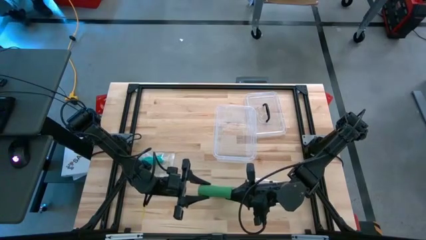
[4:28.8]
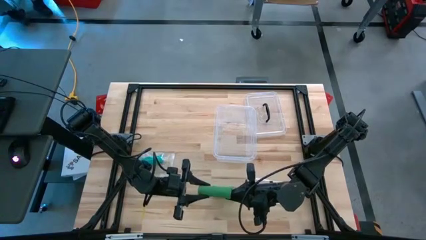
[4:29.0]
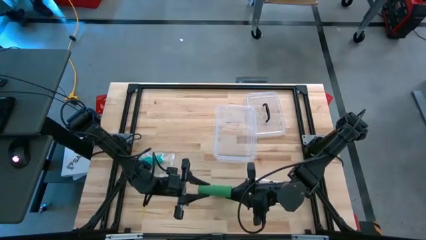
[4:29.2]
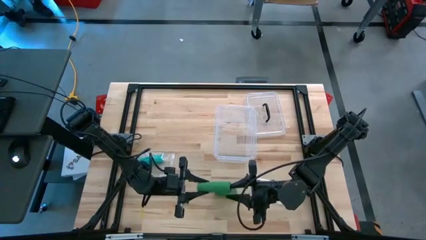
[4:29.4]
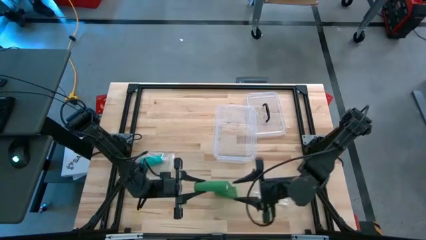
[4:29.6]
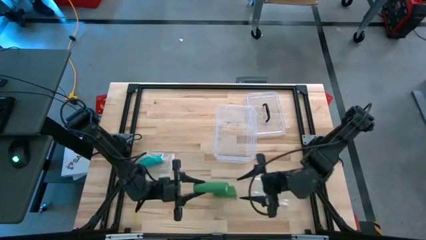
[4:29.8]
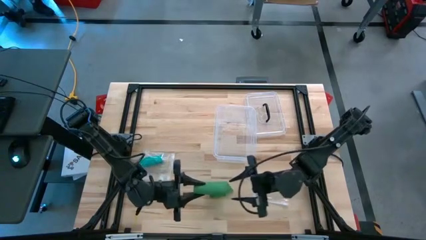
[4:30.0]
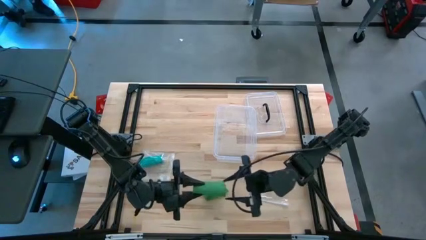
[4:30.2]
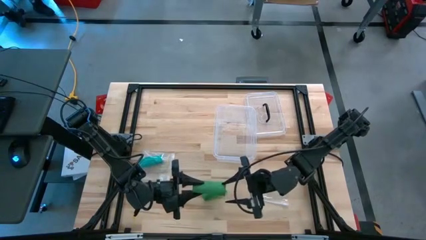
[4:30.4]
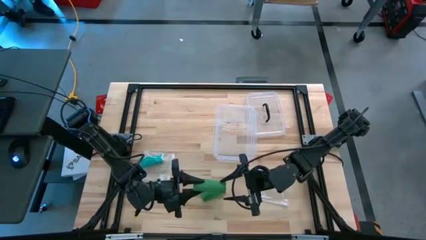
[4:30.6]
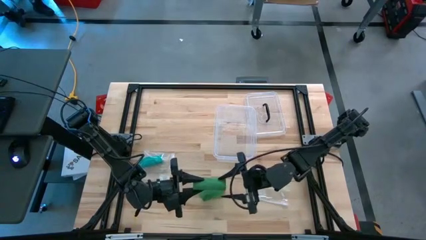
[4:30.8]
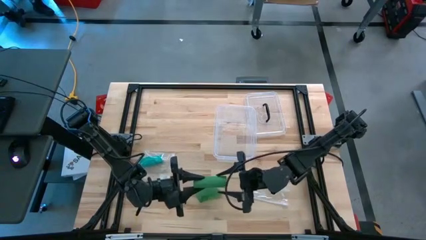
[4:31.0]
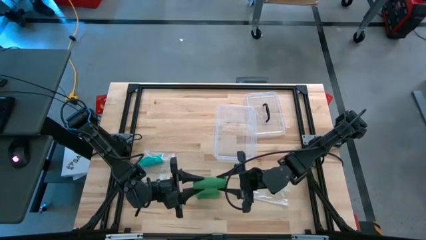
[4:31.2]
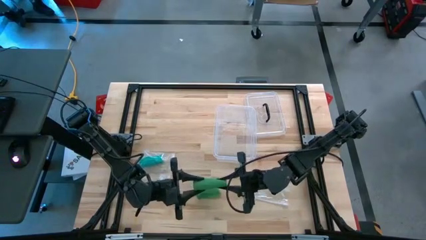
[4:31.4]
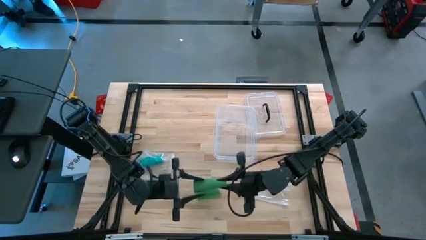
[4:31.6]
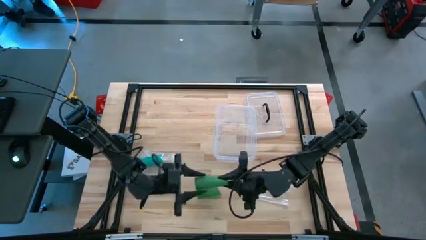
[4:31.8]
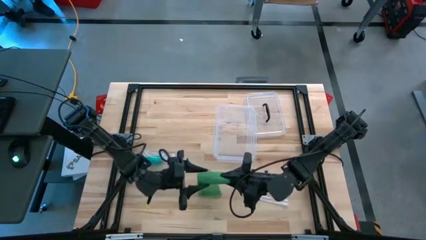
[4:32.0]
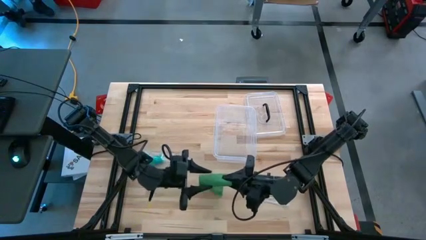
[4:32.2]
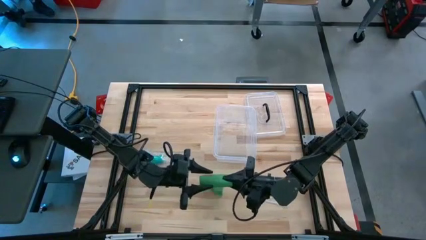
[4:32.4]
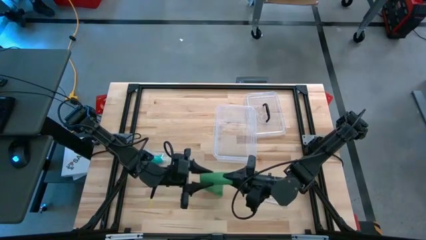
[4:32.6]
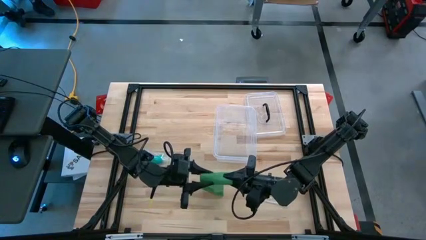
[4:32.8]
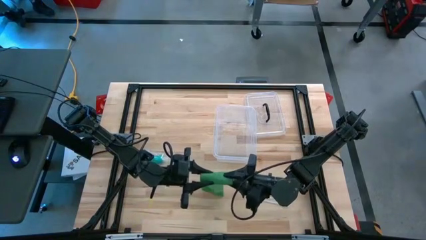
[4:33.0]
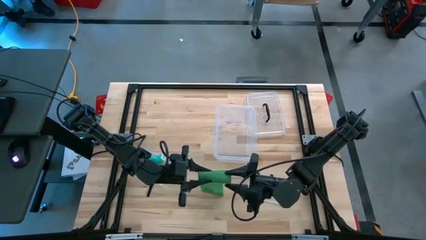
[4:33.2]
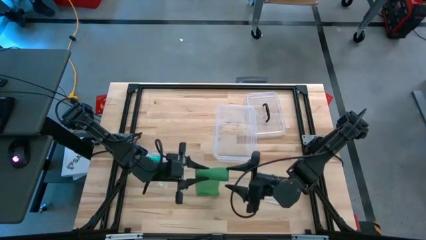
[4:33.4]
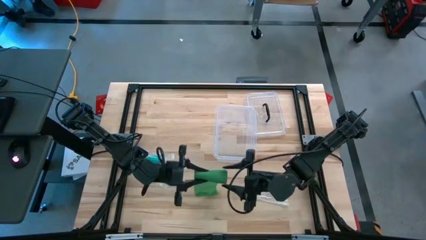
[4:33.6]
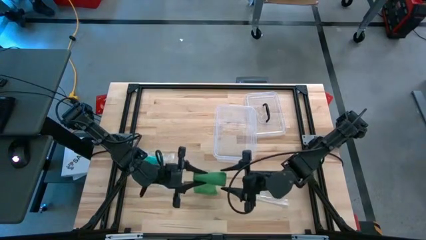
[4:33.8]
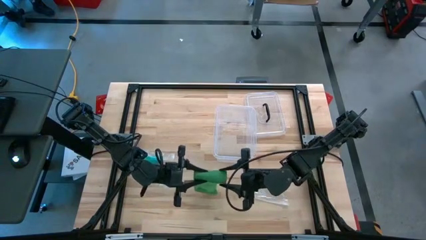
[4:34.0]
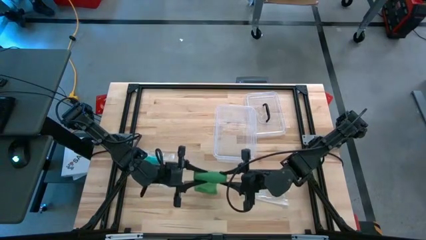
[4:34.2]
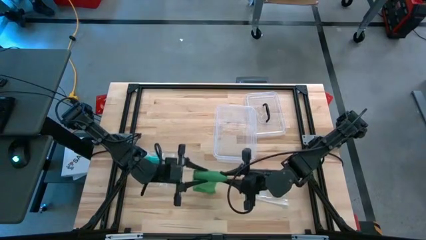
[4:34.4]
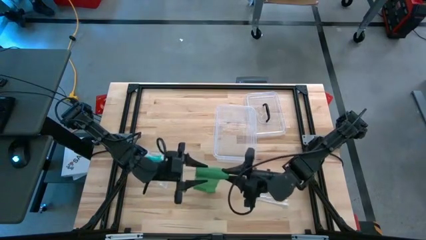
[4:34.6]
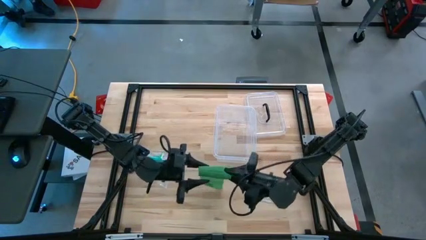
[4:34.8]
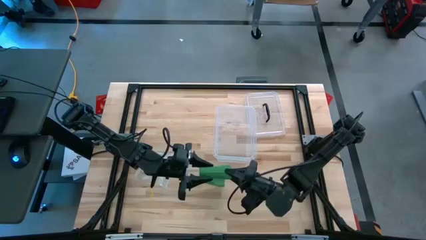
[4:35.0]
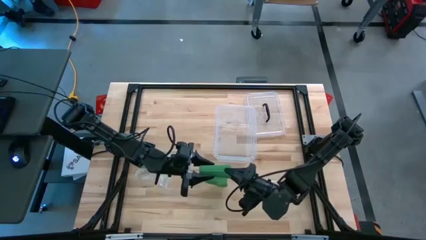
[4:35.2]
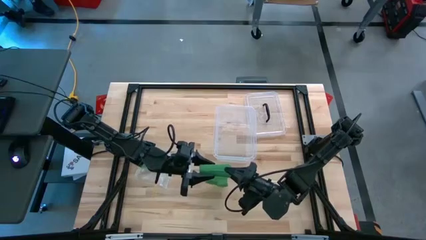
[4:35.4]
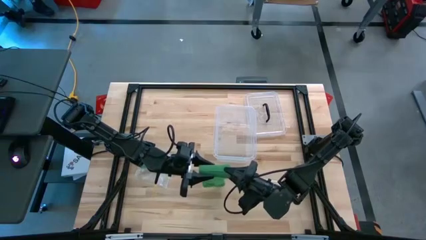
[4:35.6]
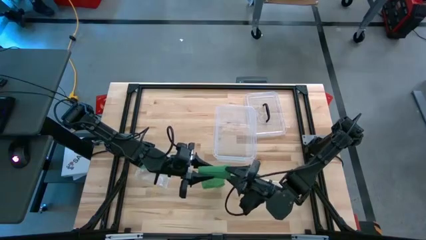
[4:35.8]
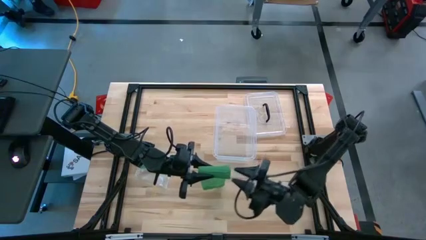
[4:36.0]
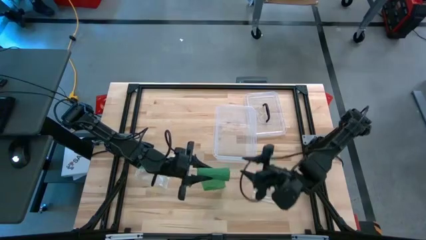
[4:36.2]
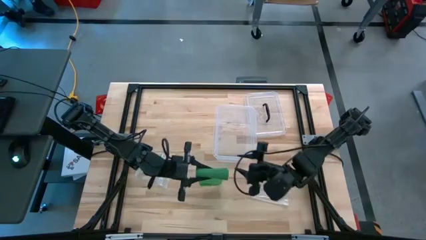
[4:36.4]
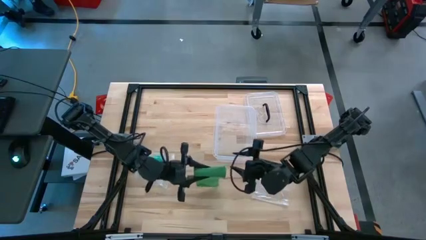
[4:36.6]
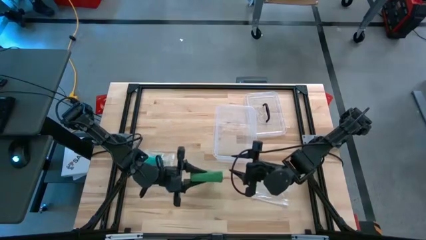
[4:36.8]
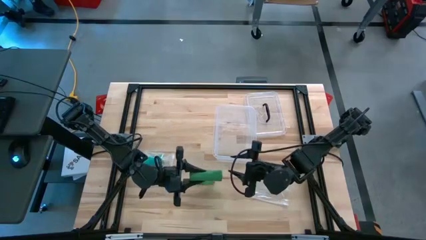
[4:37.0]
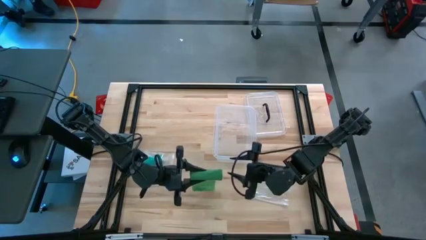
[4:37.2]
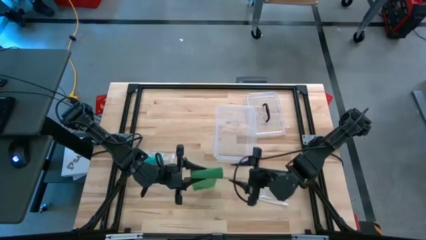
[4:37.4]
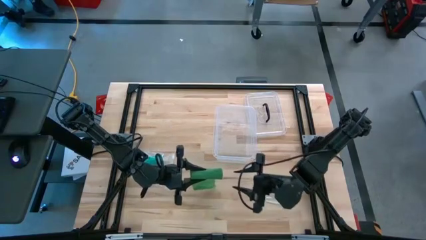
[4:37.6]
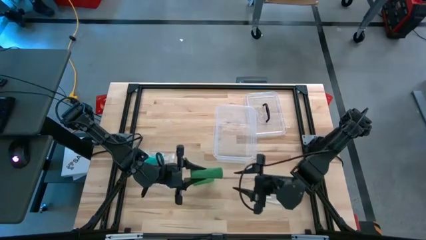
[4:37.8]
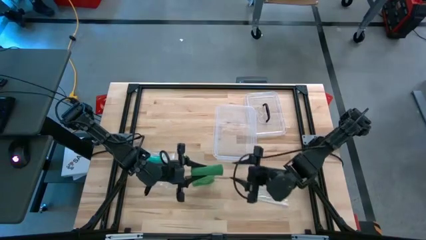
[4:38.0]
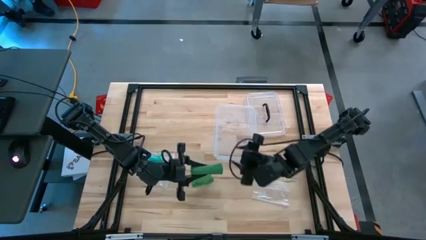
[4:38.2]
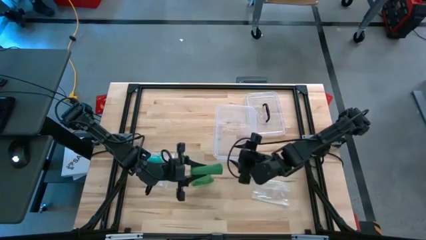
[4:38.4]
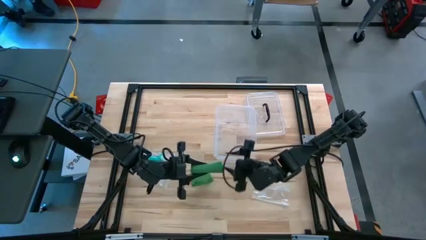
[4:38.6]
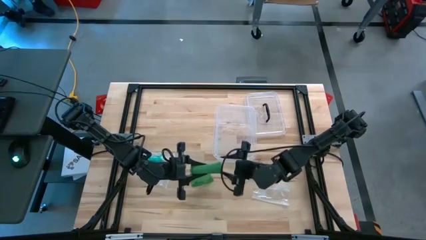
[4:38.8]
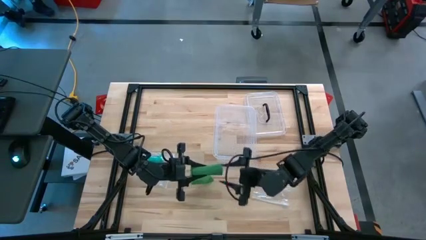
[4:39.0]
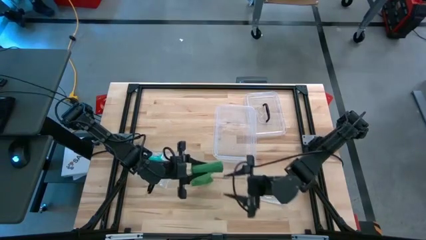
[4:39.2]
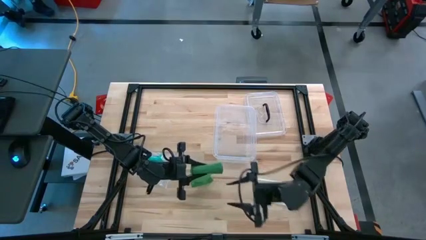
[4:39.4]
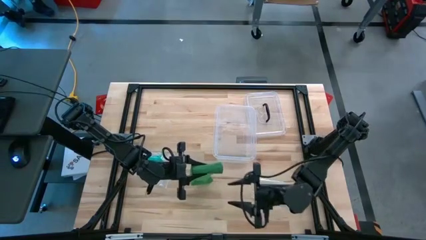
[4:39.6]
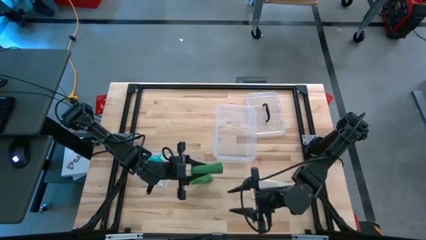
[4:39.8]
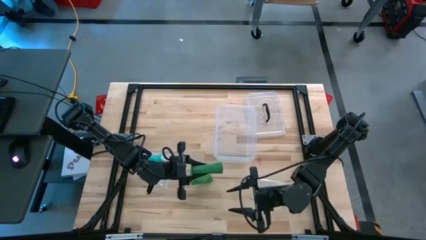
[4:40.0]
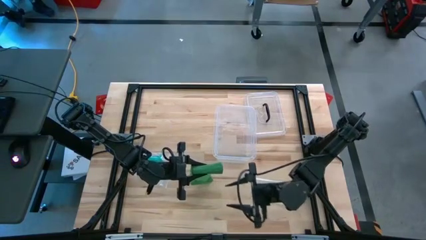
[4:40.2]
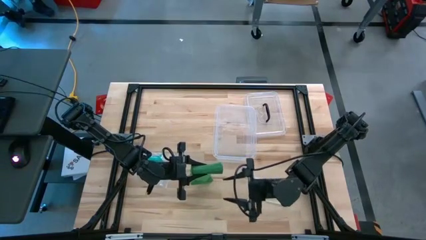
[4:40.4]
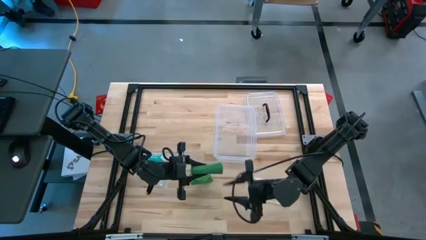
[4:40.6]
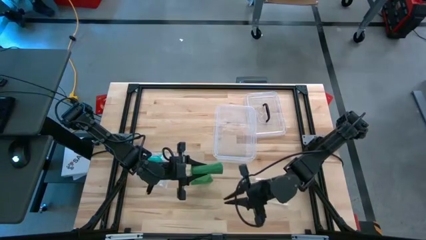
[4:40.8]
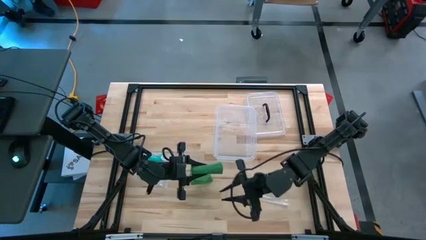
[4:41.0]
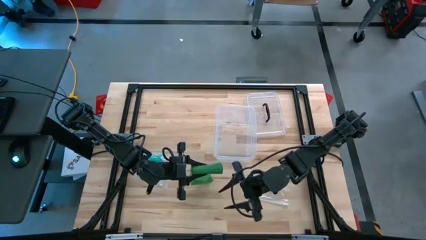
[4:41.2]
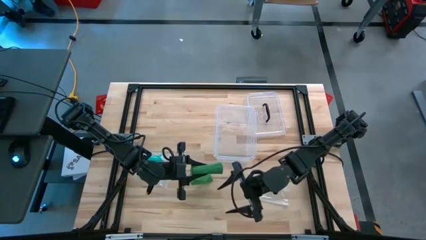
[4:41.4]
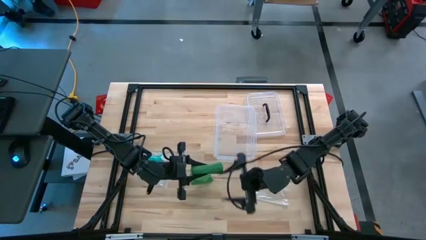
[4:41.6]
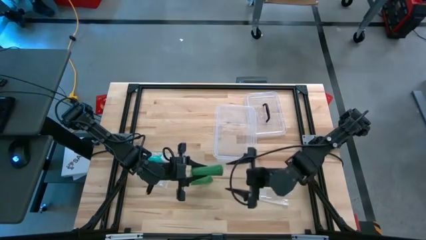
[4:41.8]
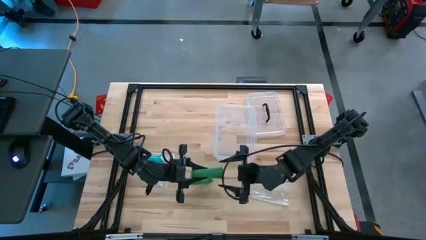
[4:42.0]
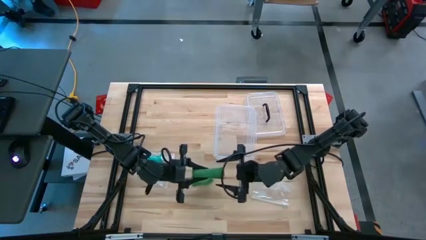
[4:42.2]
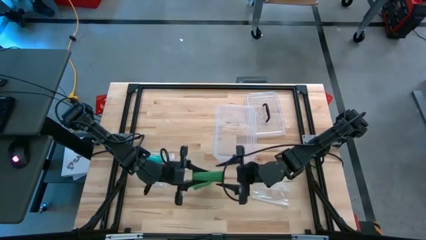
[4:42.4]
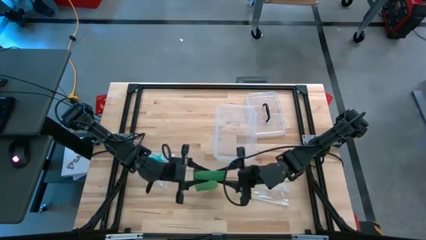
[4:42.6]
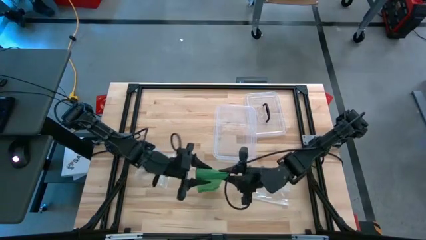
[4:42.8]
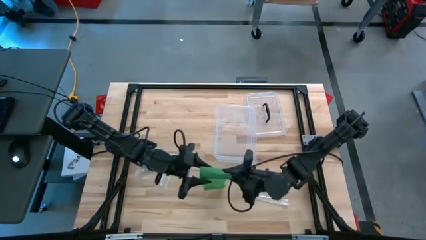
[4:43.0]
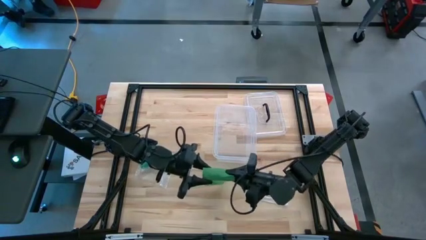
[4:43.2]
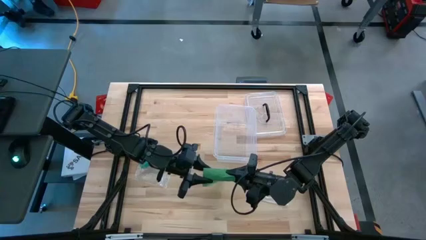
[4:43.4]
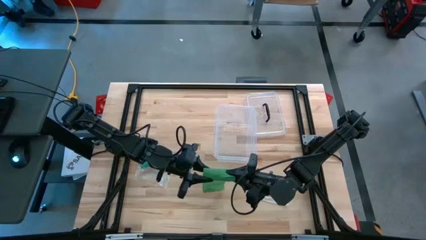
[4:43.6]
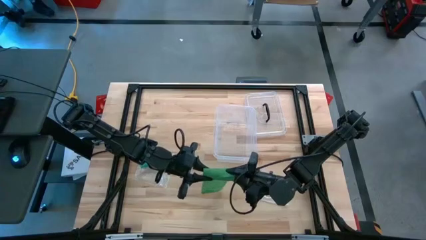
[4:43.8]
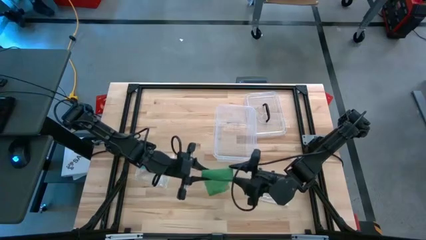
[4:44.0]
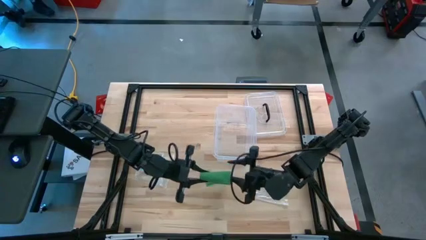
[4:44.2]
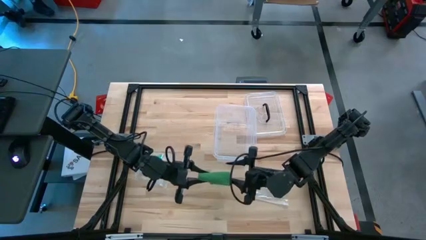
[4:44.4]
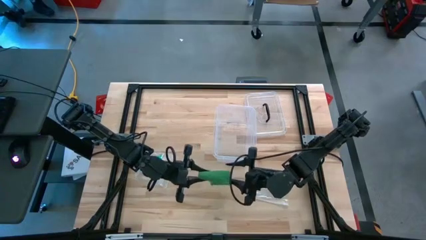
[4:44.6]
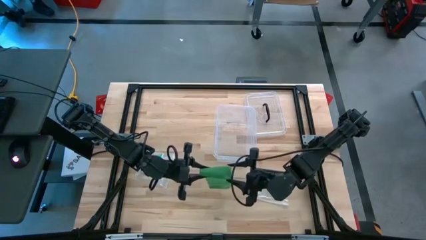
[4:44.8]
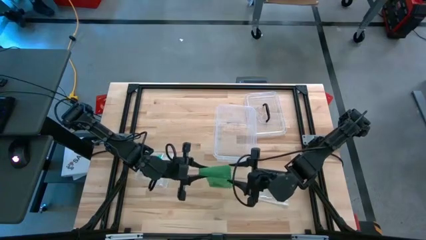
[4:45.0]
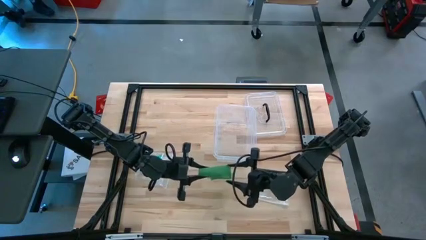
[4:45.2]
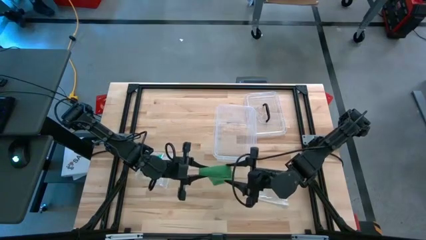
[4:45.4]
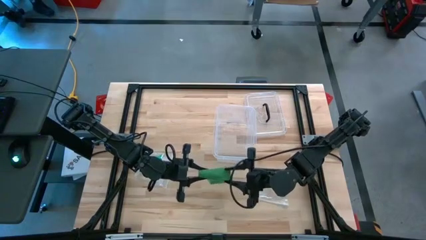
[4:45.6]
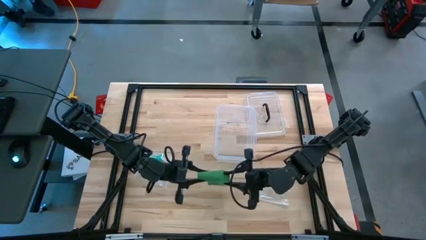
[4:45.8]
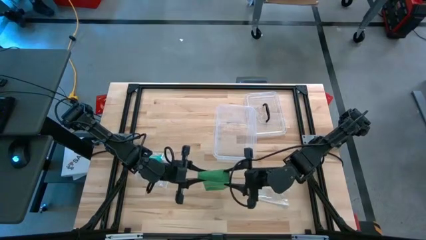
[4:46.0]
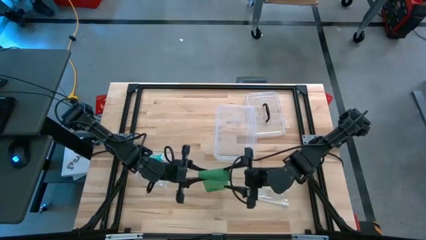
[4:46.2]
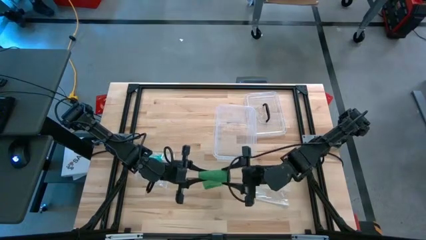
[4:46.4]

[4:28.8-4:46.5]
Task: Roll bandage
Roll the green bandage
